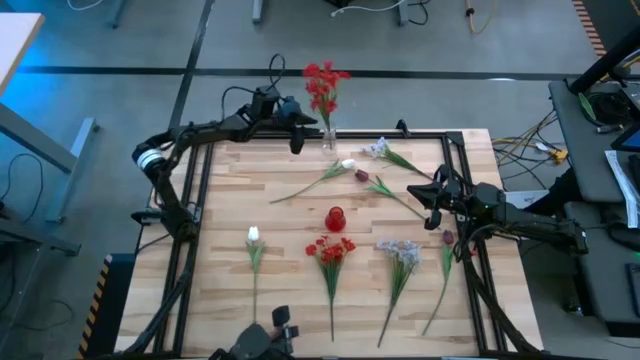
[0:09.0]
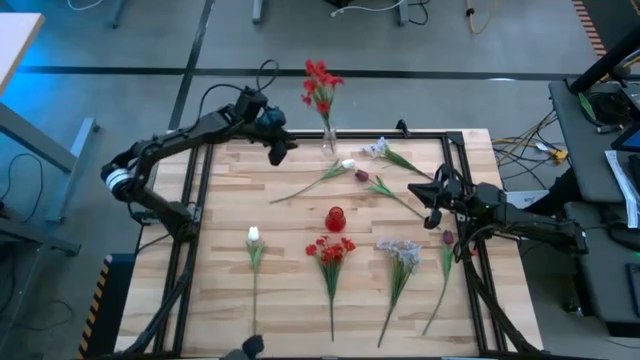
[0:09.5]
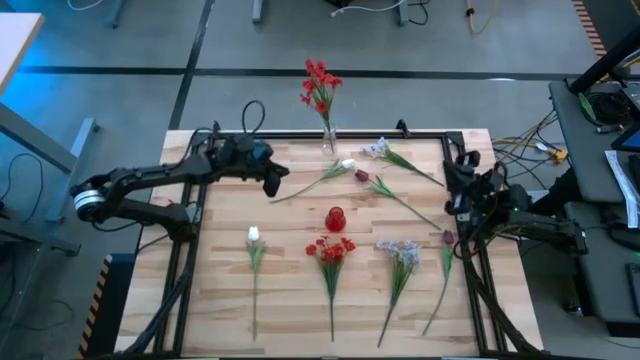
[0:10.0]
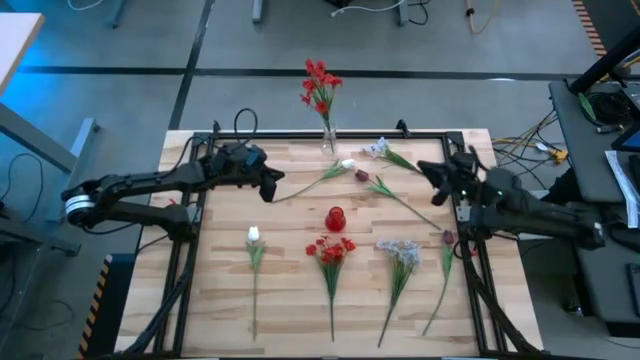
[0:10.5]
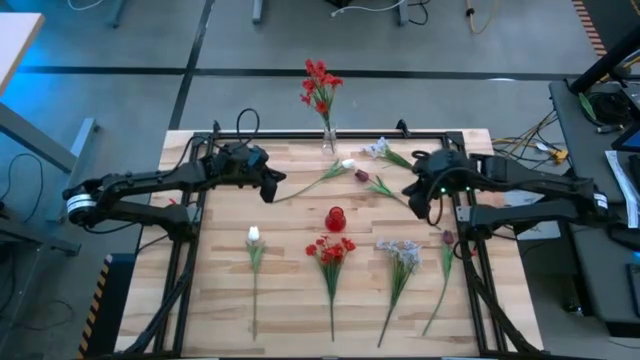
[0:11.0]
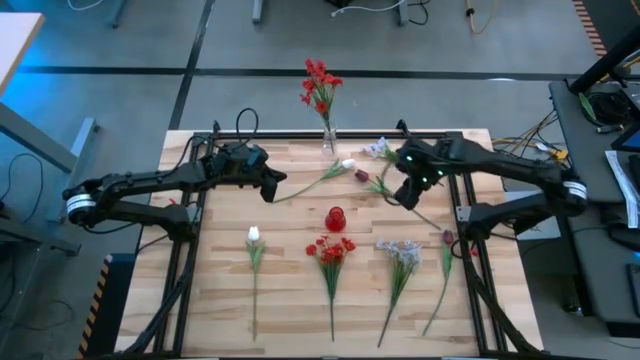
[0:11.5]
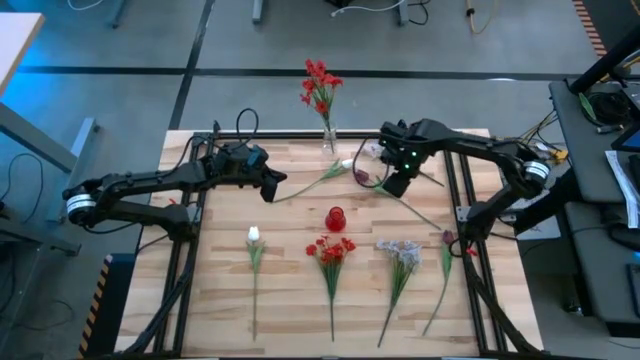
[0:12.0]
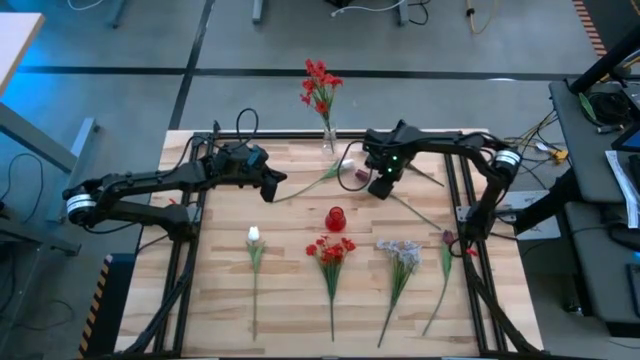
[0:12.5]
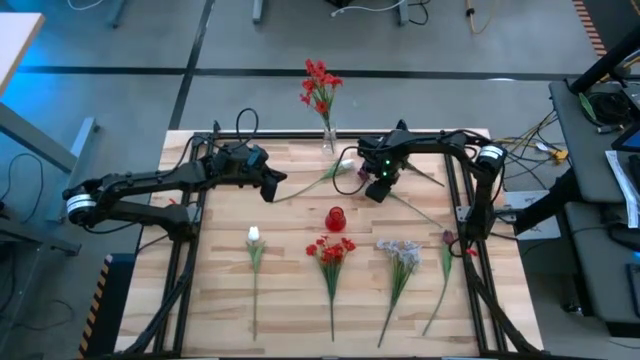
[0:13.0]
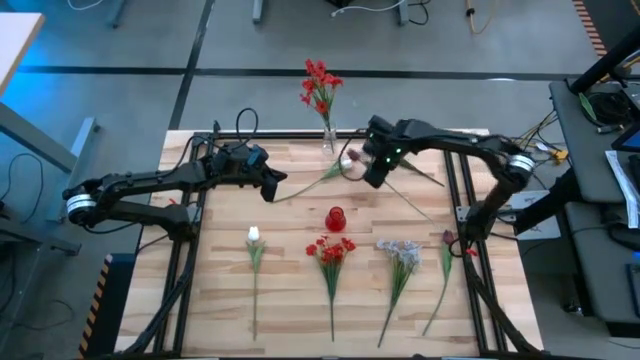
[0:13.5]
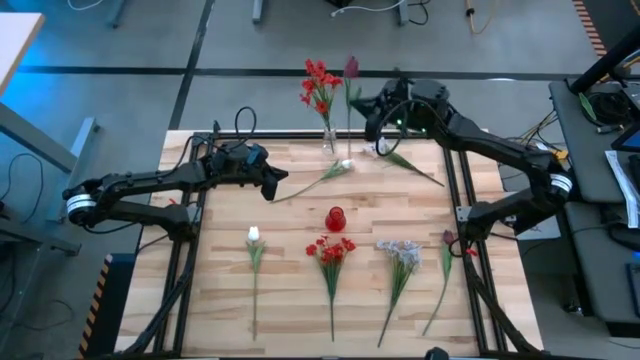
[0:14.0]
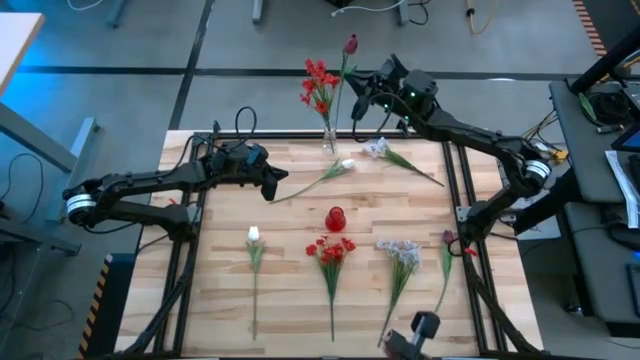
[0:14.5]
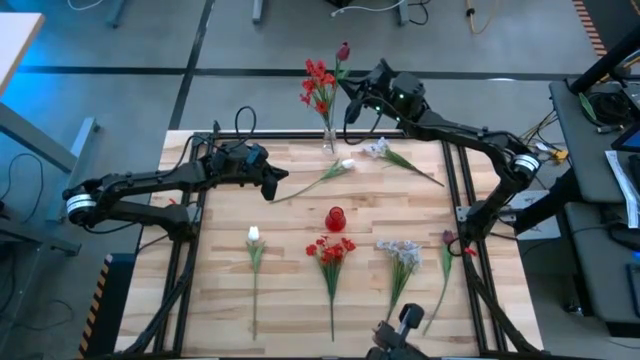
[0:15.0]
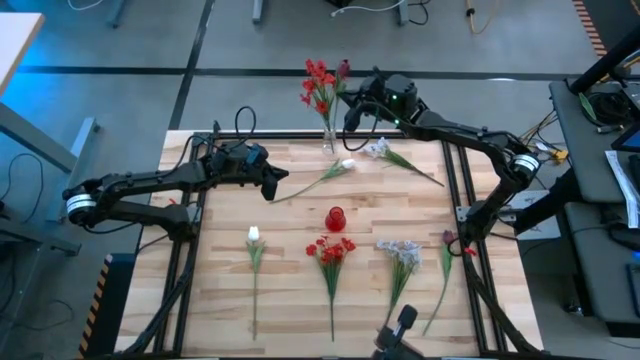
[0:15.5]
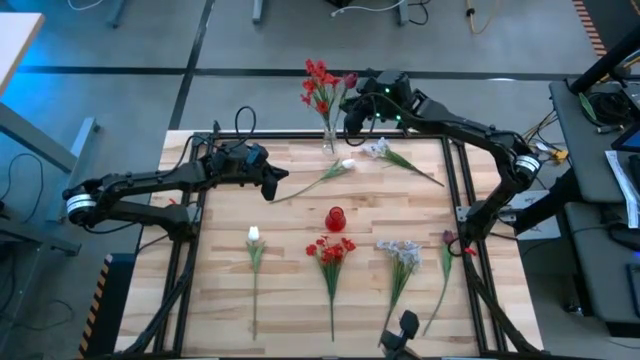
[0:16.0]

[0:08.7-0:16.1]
Task: Sort flowers into vase by color
Put the top red tulip into the transparent vase

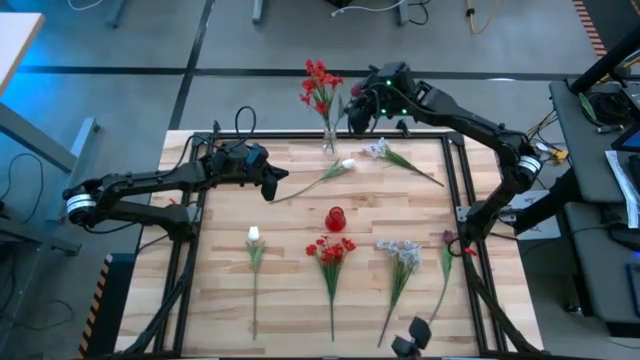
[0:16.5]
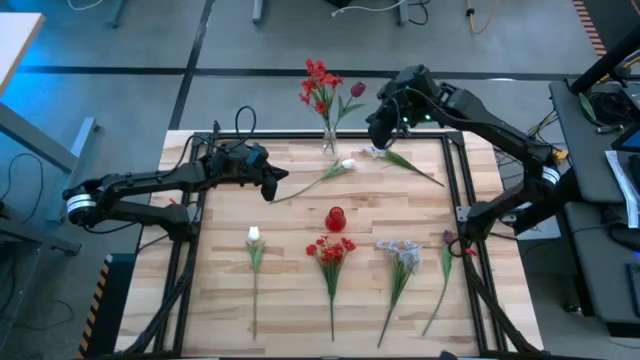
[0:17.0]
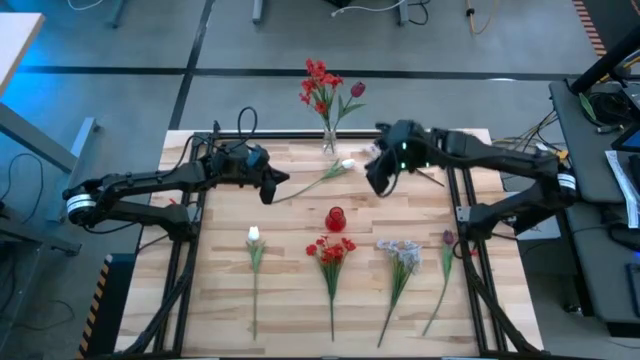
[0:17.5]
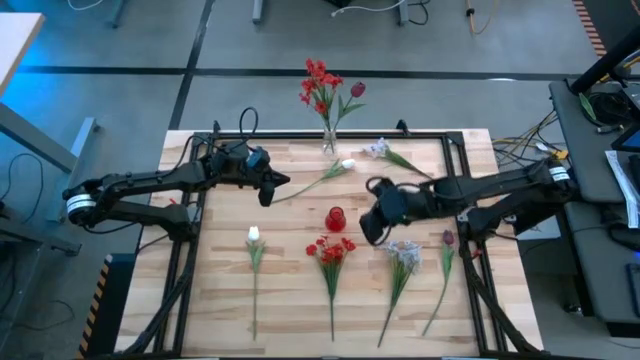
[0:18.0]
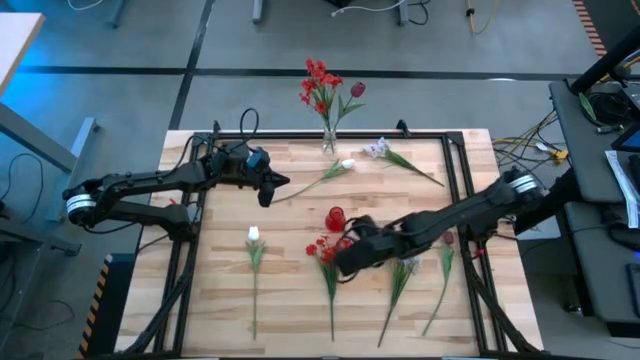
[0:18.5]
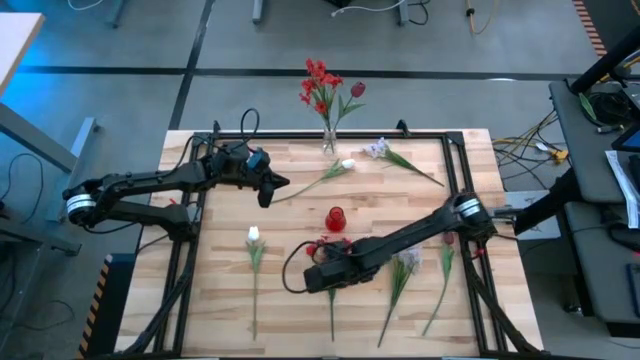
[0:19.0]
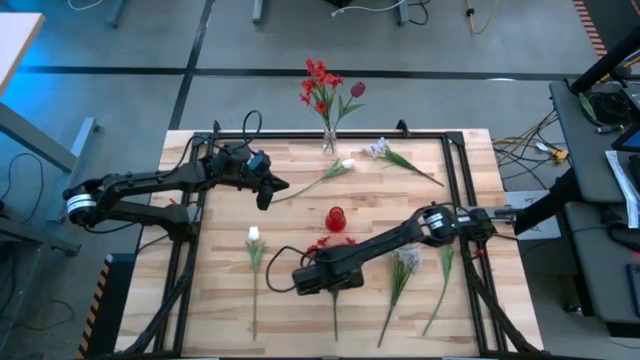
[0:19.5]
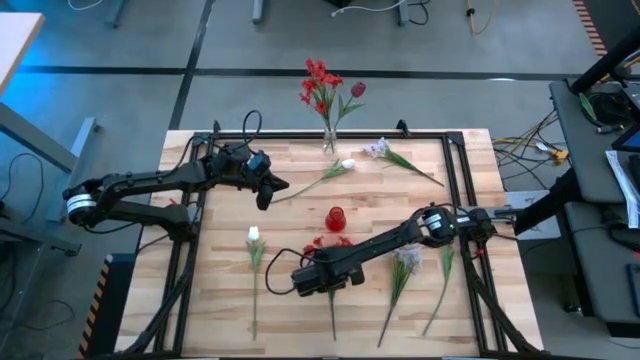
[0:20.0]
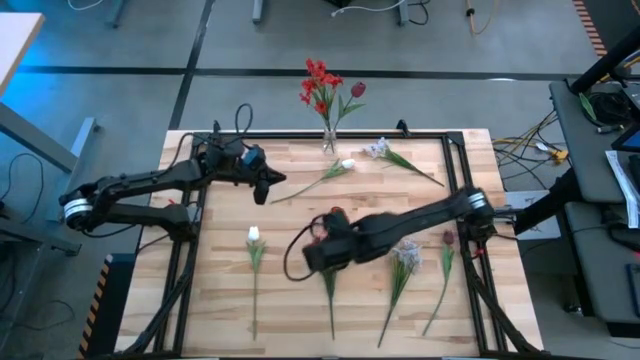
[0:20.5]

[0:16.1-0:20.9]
Put the red flowers into the transparent vase

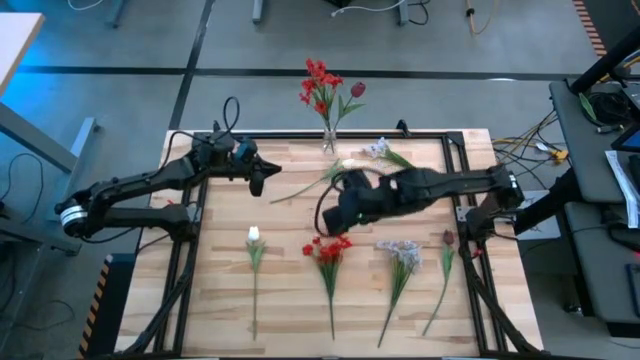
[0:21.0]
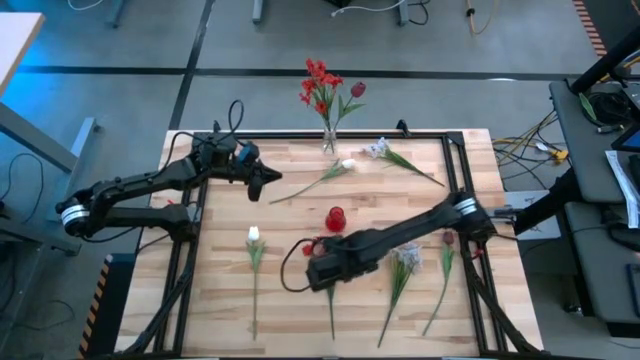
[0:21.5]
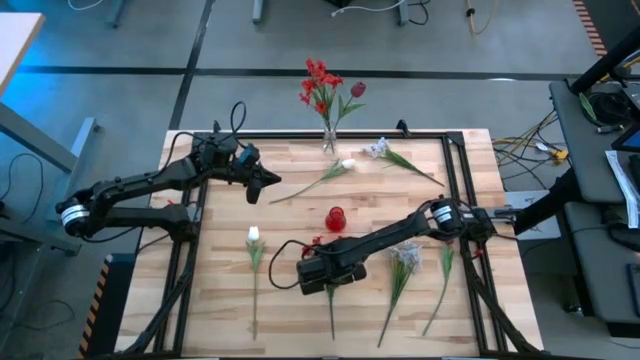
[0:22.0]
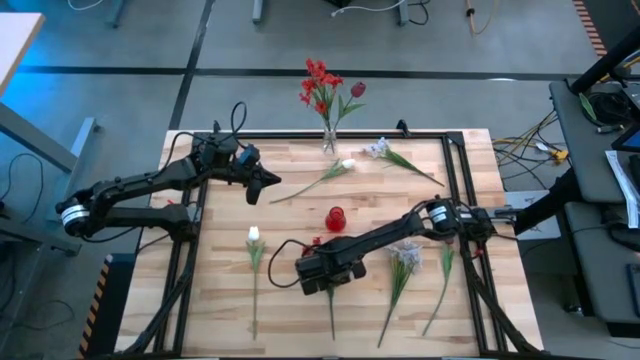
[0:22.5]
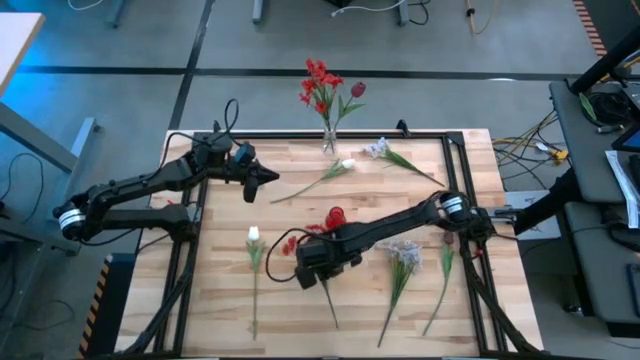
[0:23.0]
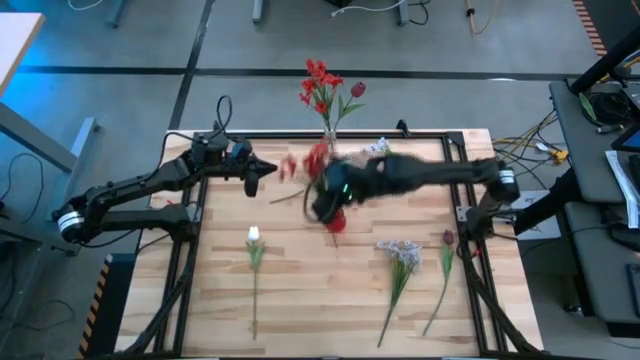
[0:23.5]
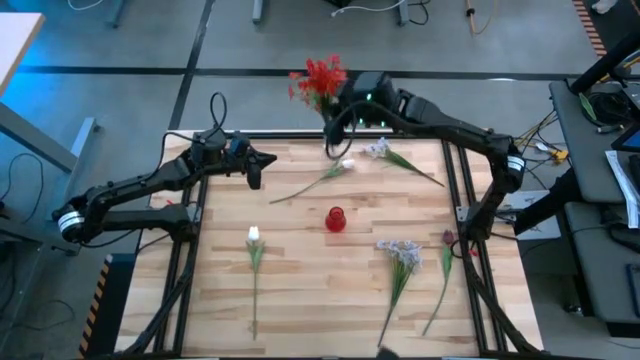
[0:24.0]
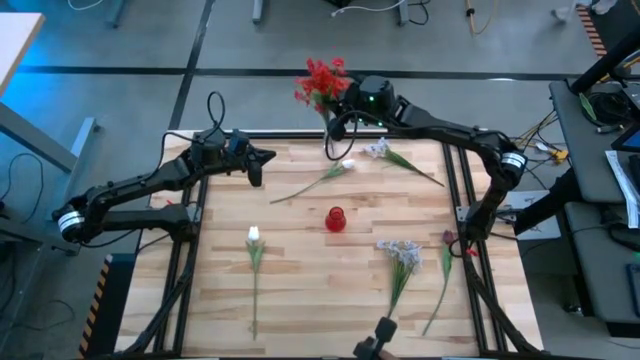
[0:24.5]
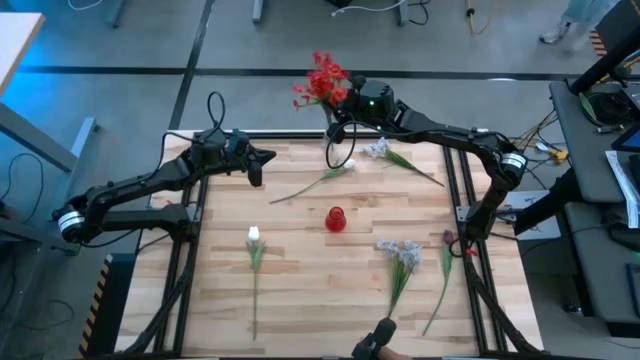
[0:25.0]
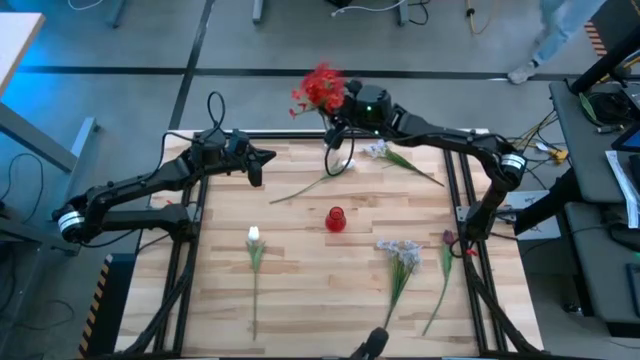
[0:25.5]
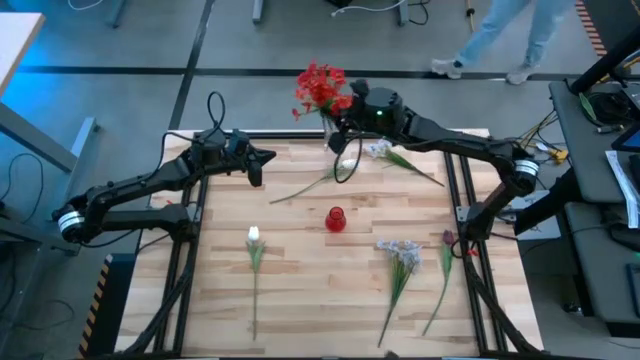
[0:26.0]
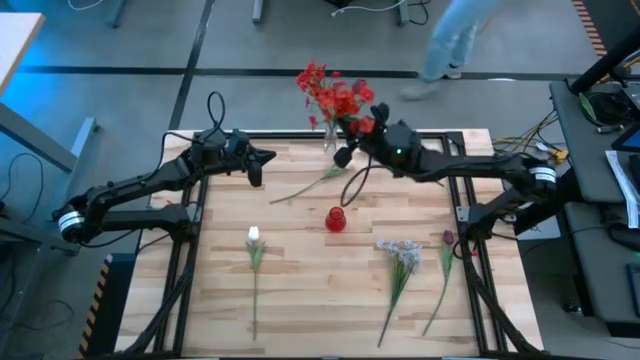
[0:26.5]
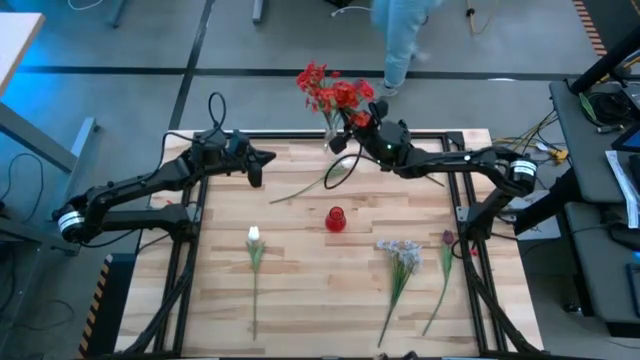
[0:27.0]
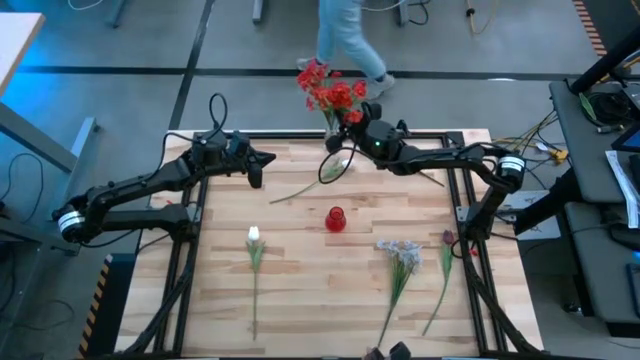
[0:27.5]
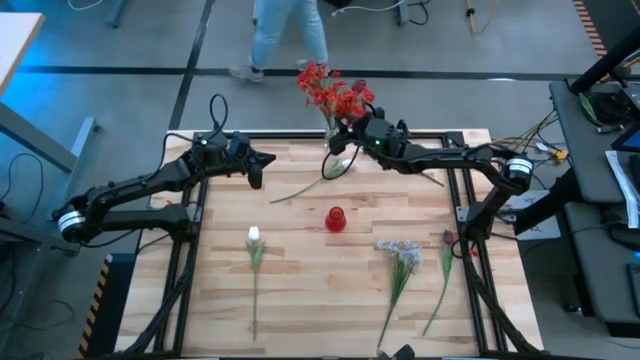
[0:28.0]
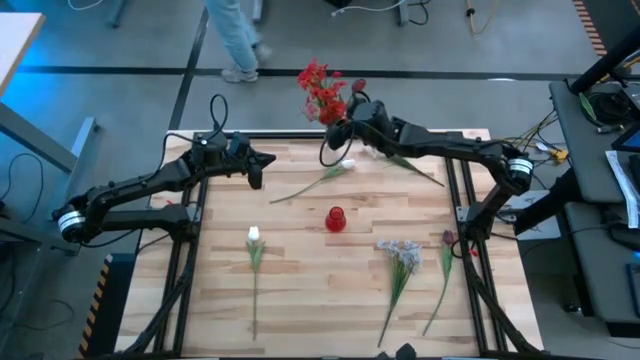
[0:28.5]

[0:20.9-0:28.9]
Put the red flowers into the transparent vase
